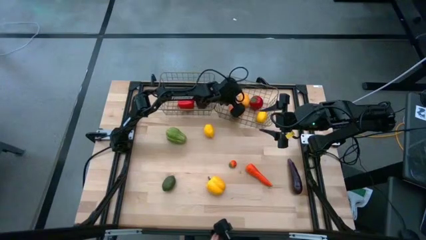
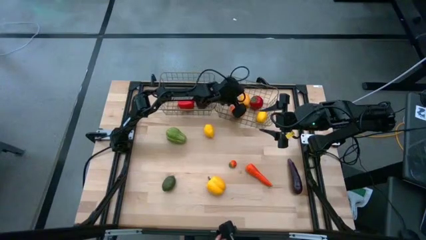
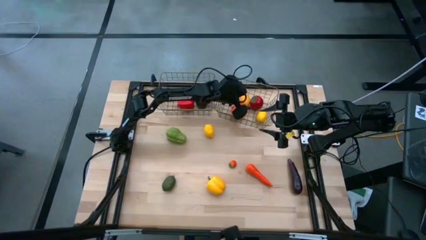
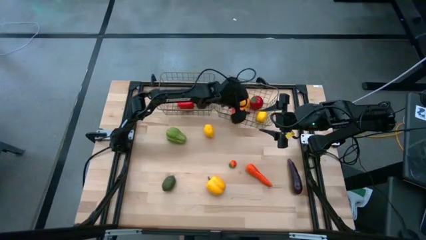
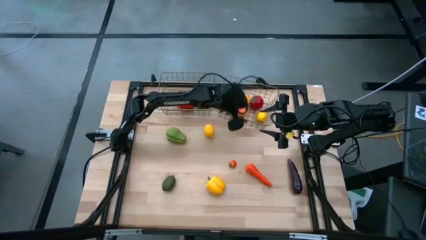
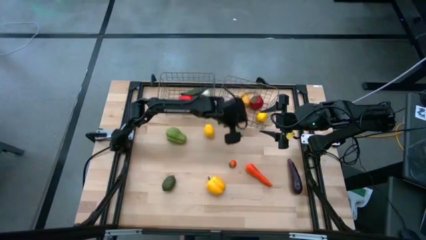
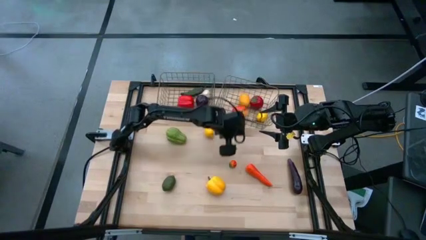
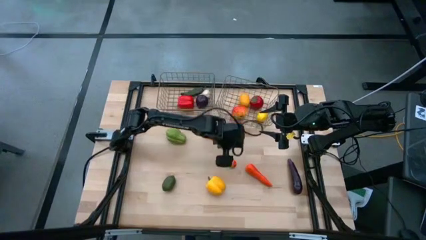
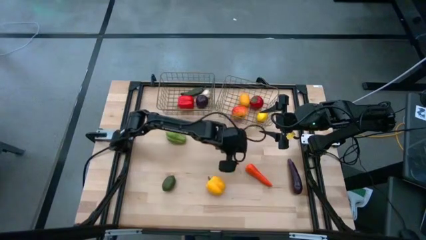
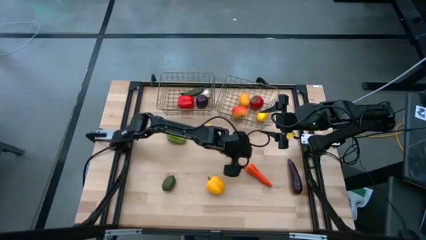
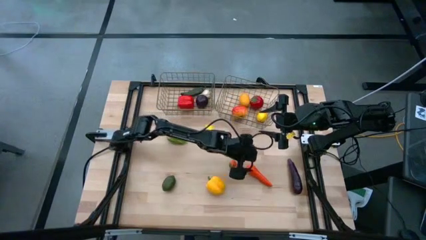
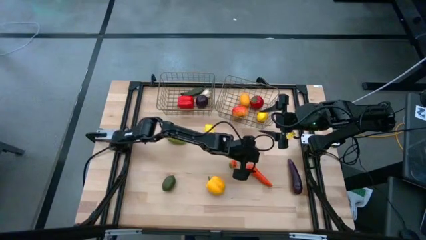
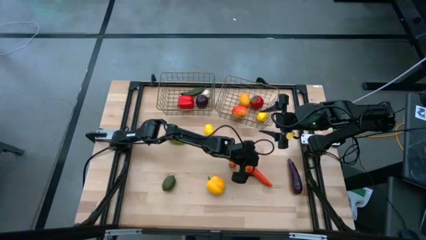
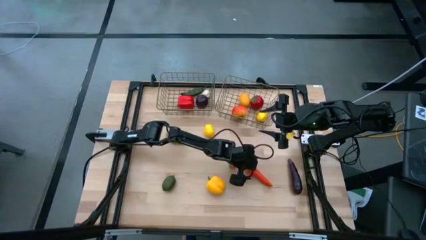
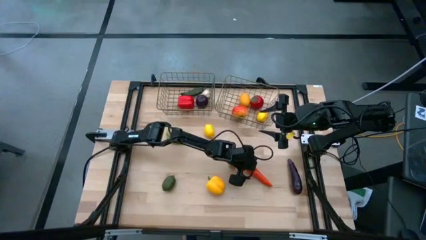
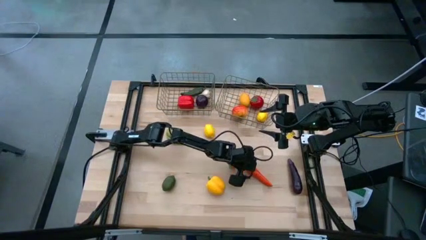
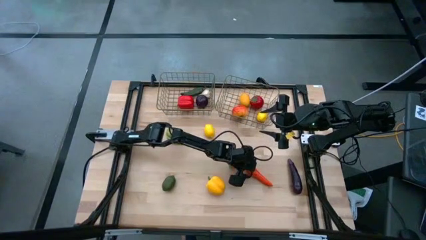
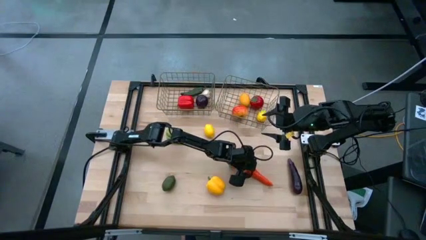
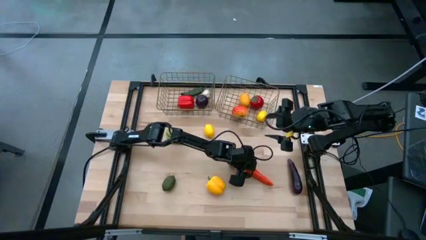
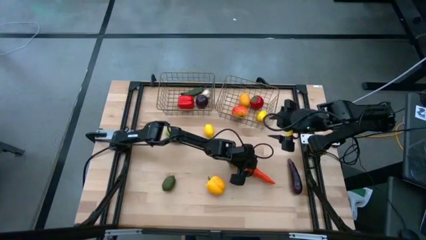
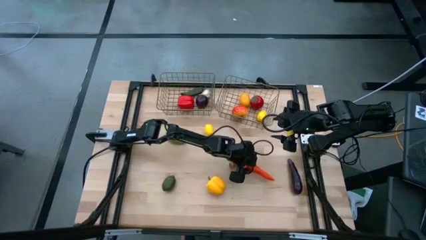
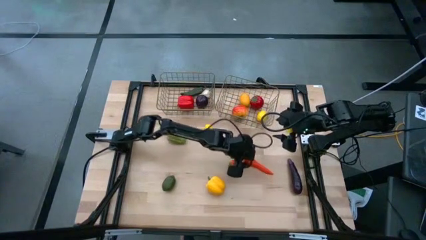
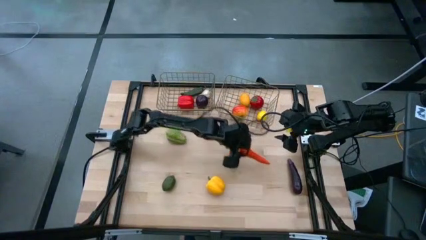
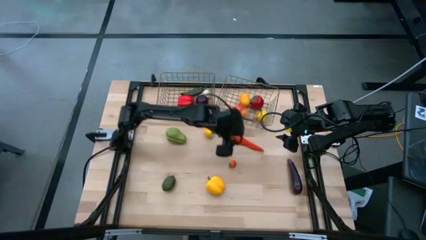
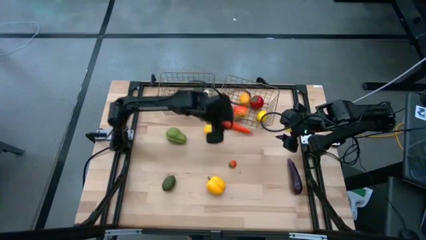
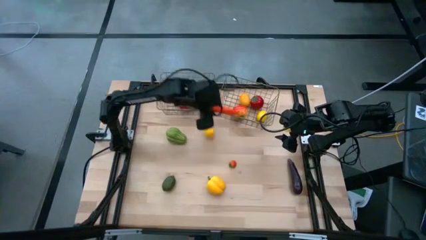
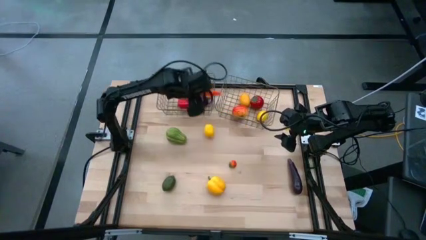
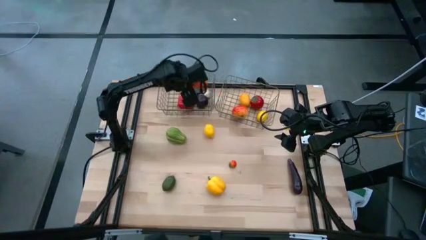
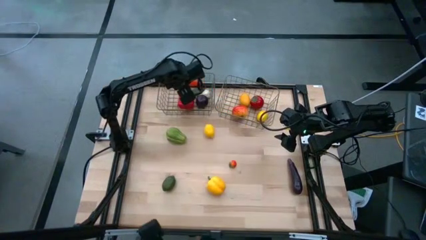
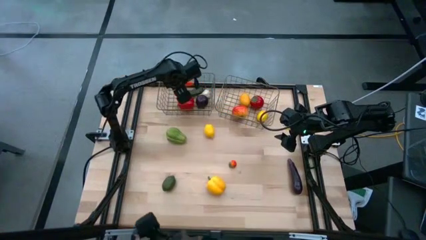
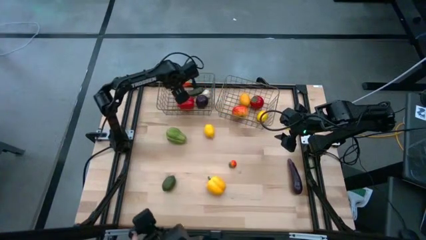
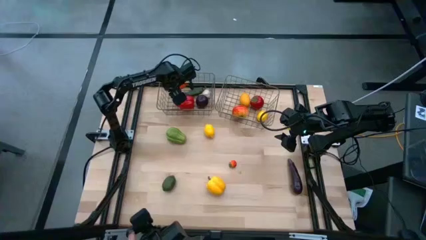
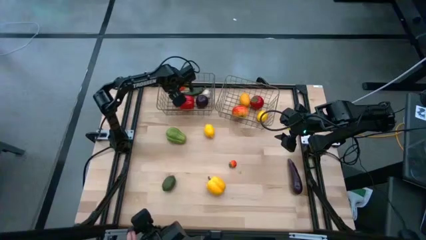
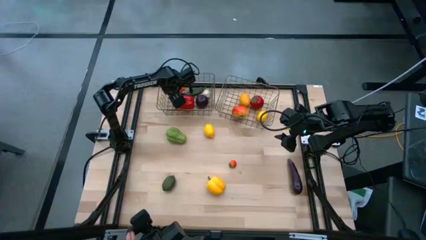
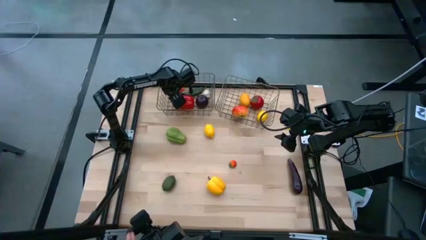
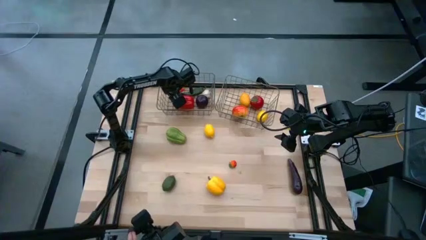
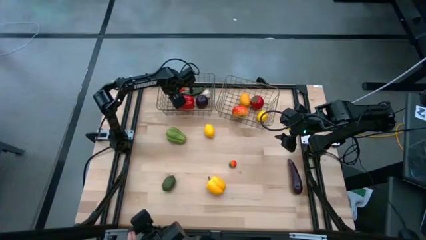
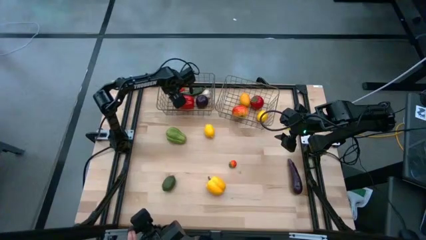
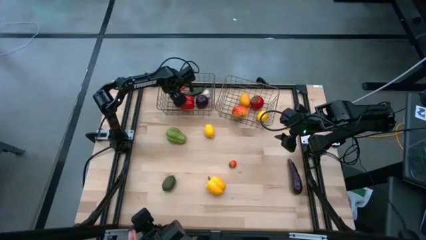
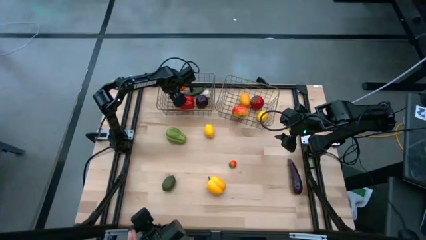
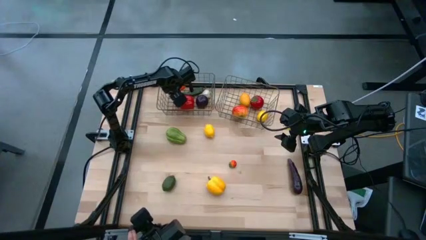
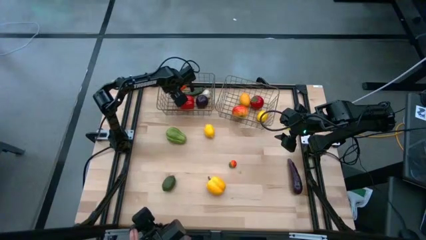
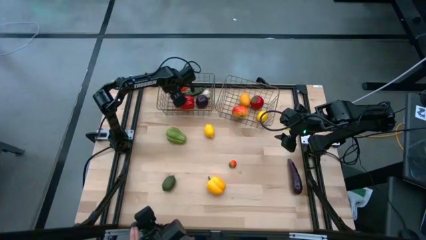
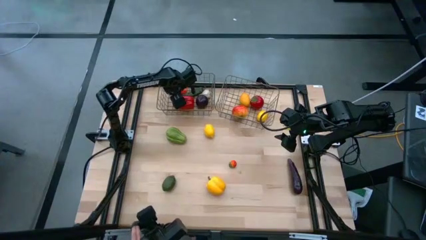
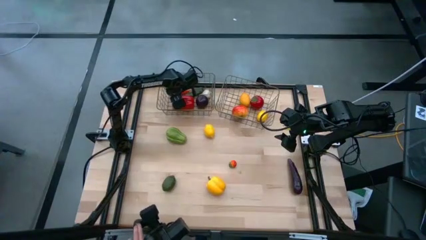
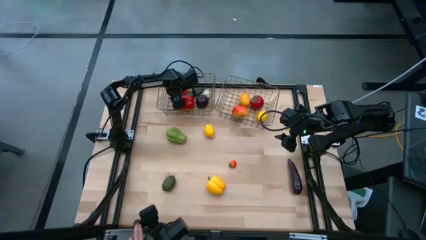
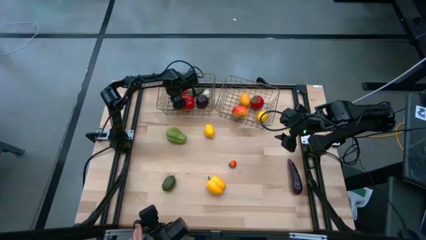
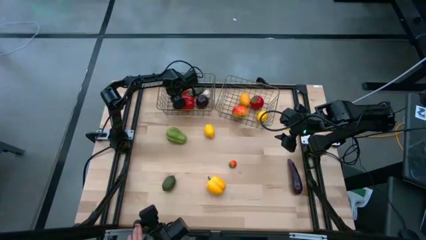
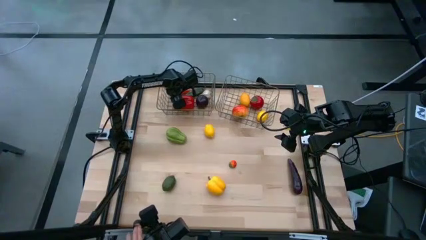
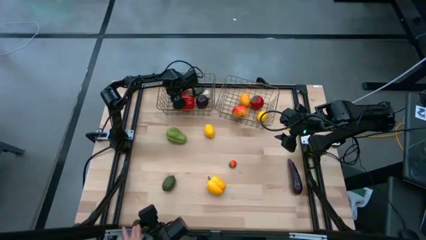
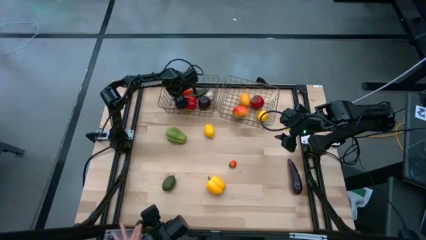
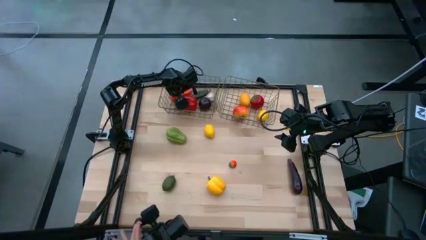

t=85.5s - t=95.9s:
Task: Sort produce into baskets
Put the orange carrot into the left golden wire basket

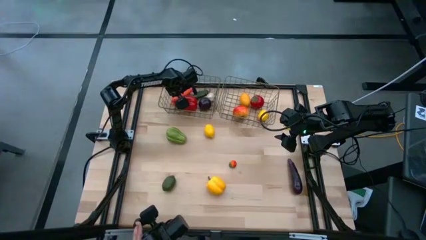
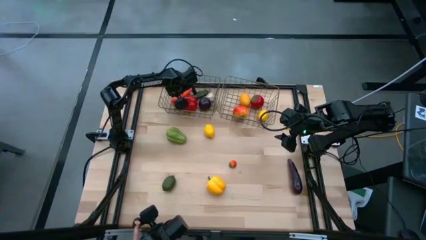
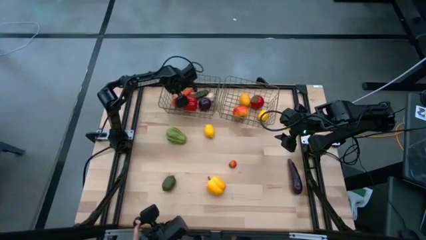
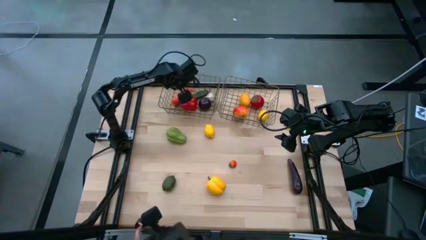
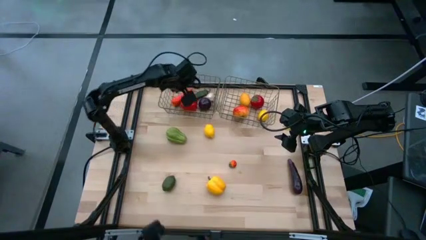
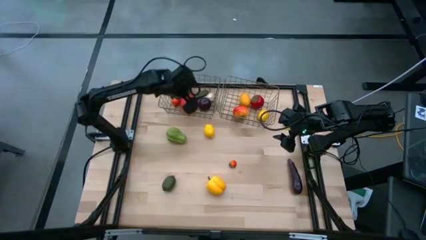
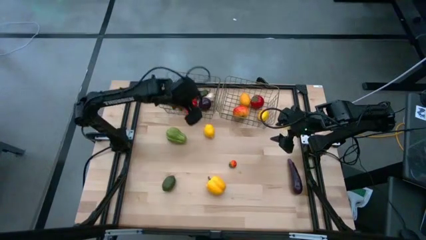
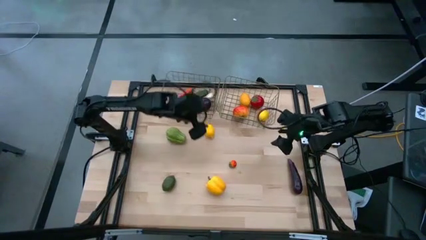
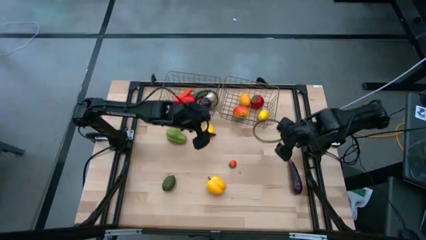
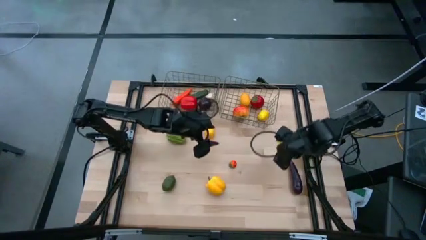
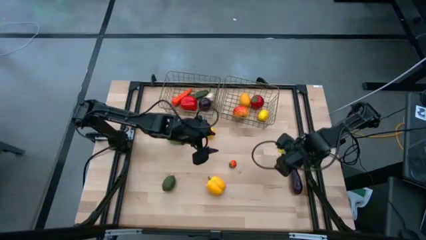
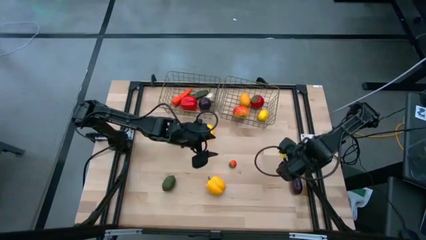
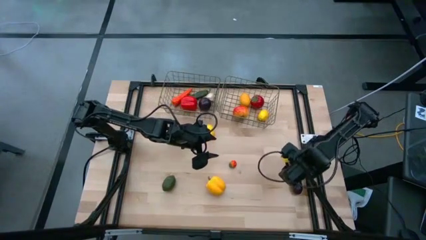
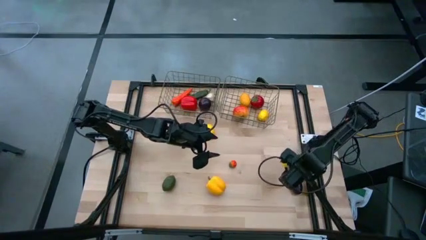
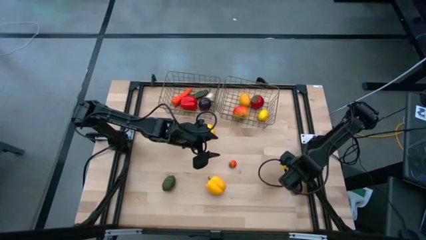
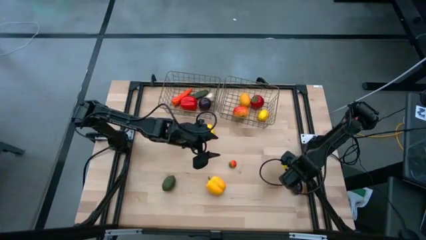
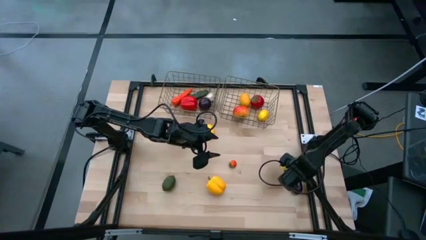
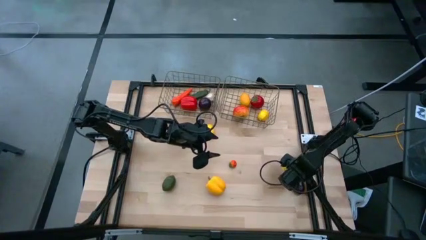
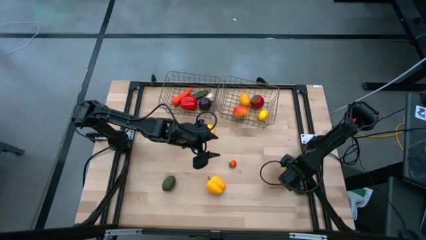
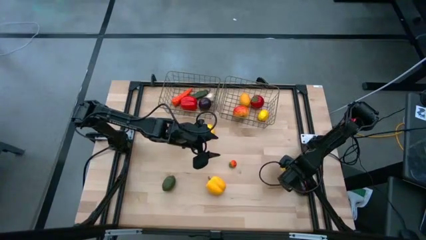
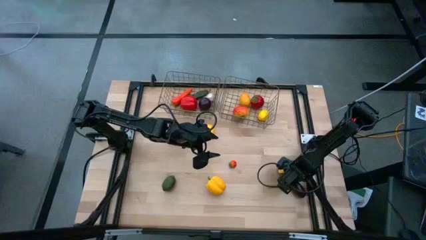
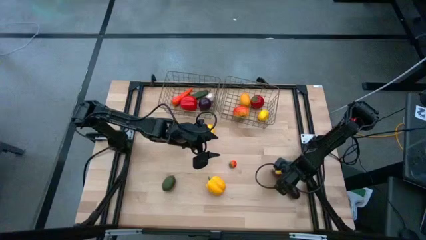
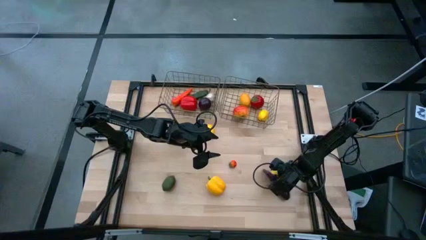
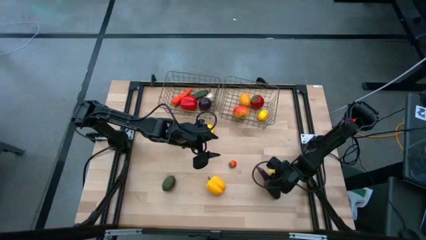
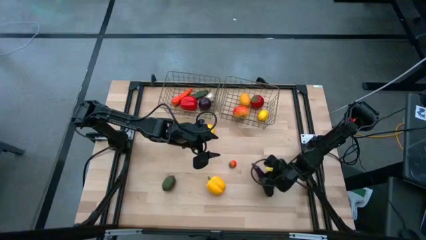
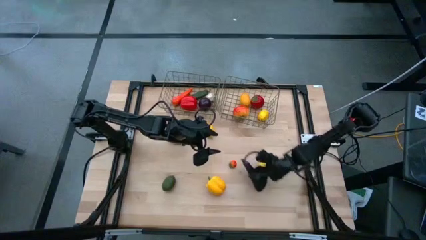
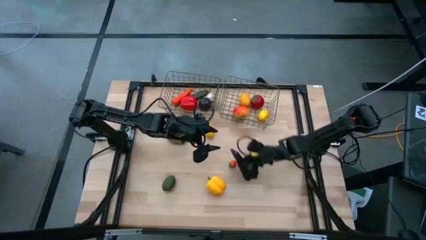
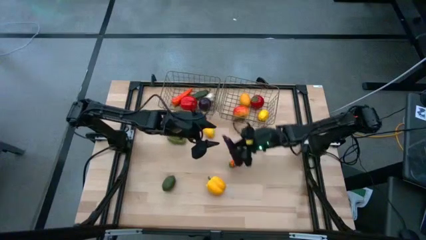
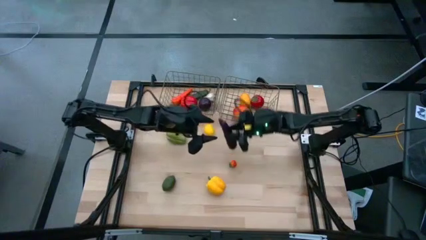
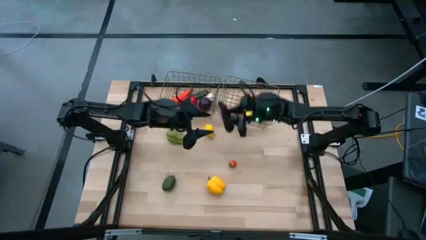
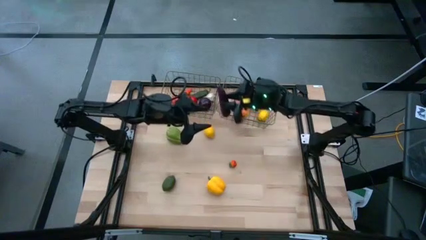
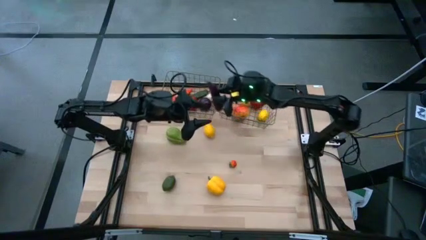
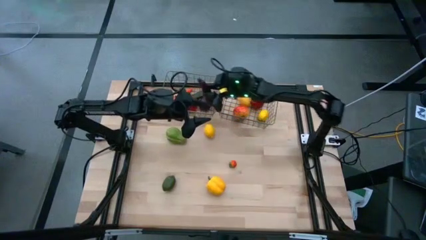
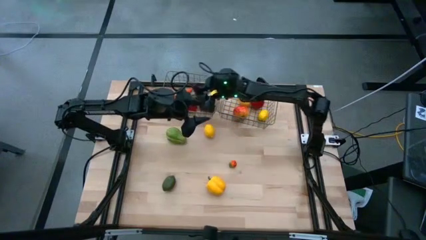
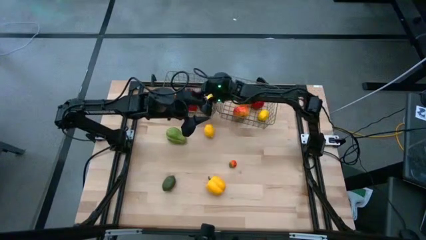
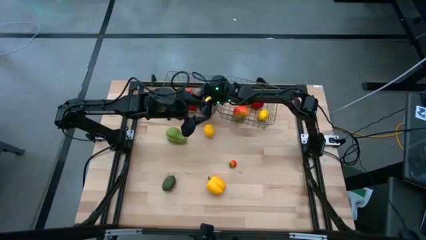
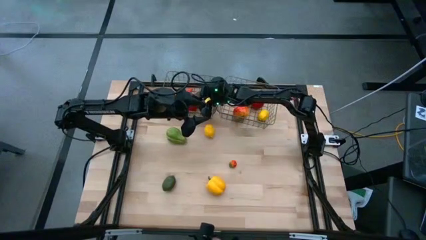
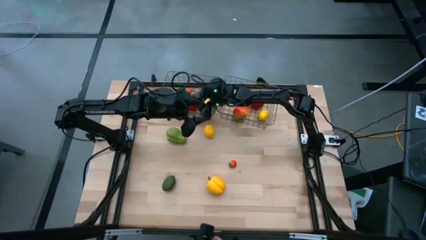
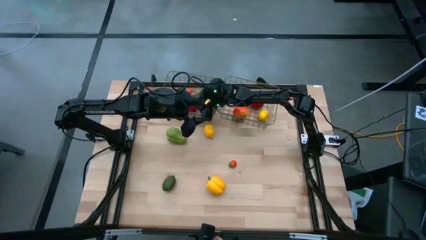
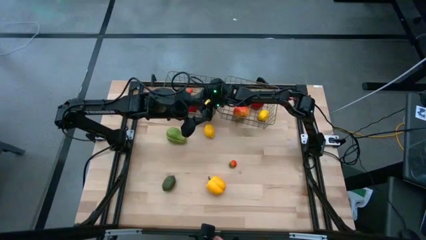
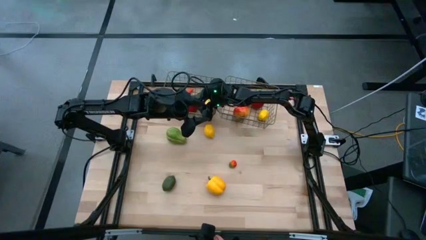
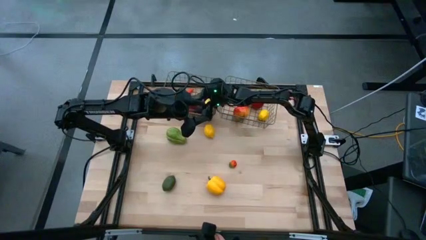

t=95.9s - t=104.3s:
Put the purple eggplant into the left golden wire basket
